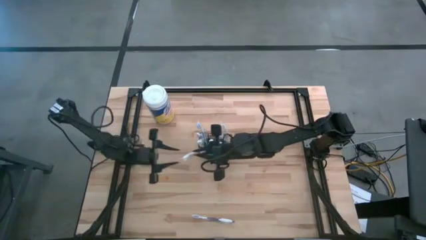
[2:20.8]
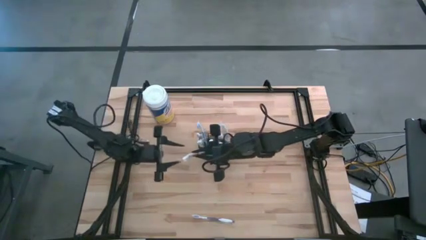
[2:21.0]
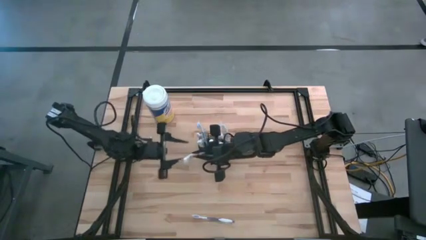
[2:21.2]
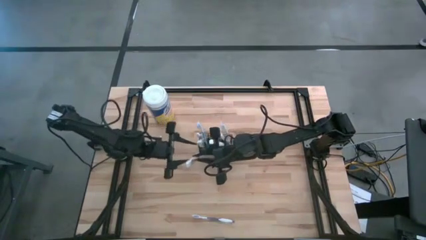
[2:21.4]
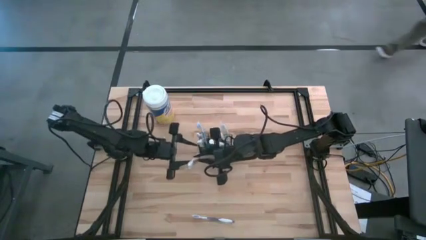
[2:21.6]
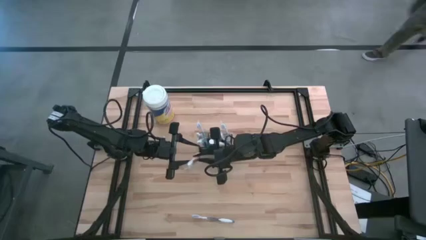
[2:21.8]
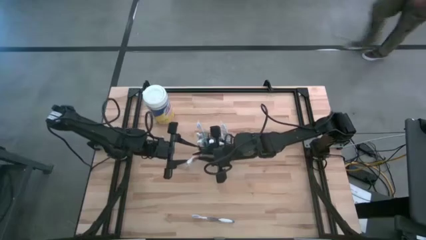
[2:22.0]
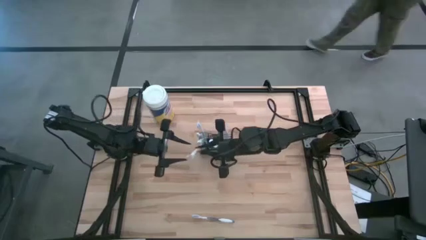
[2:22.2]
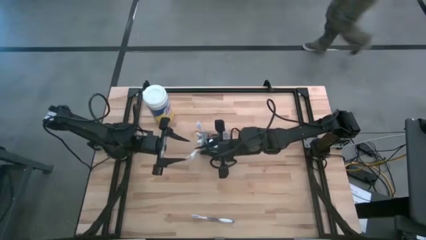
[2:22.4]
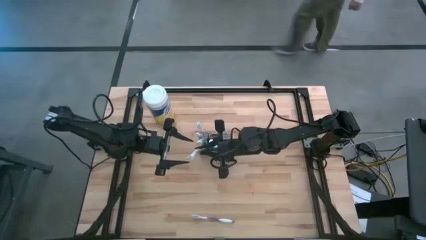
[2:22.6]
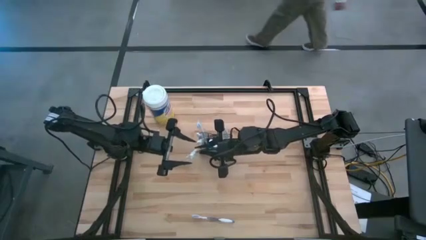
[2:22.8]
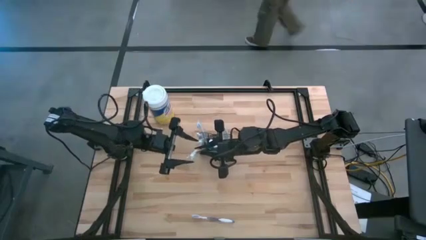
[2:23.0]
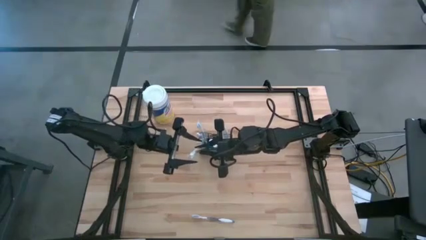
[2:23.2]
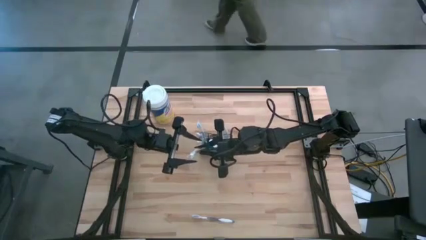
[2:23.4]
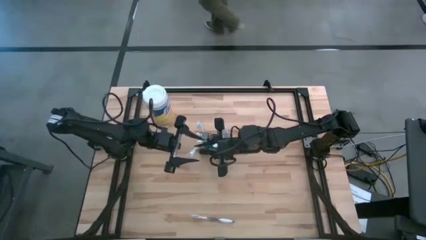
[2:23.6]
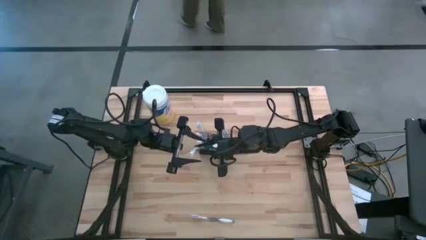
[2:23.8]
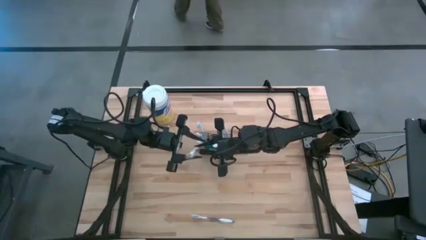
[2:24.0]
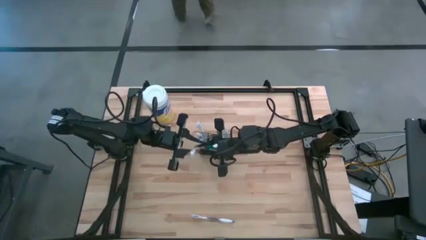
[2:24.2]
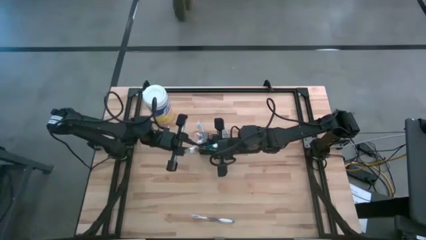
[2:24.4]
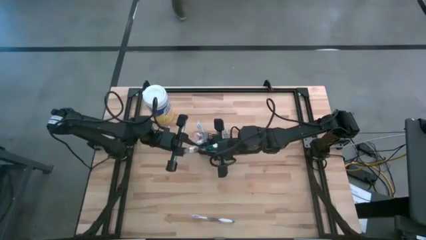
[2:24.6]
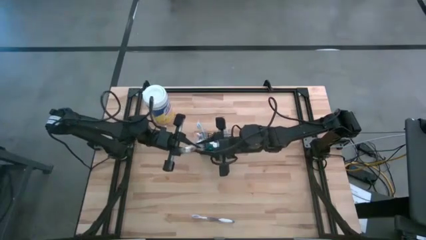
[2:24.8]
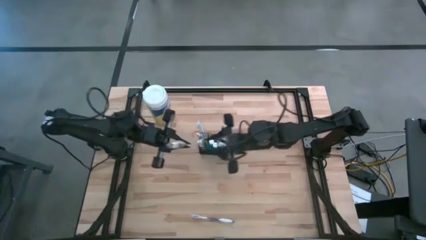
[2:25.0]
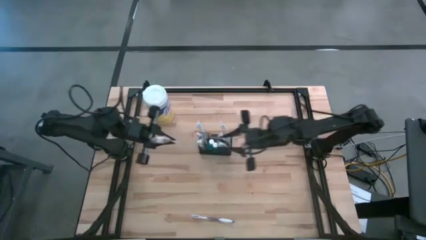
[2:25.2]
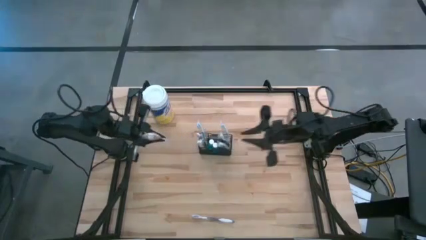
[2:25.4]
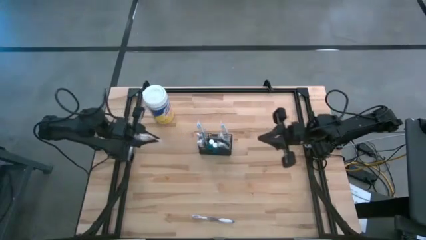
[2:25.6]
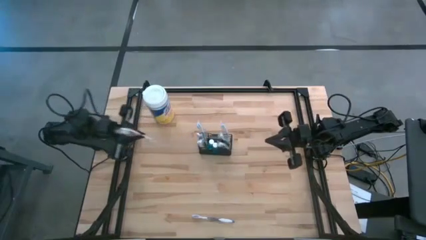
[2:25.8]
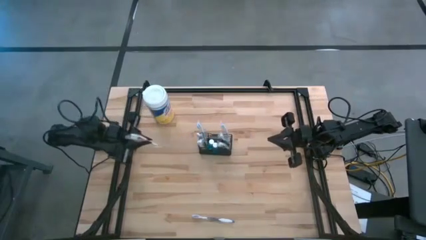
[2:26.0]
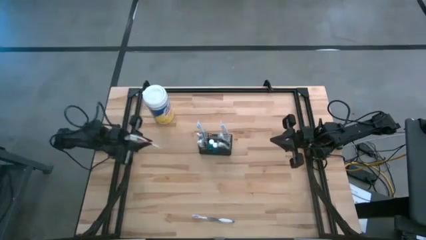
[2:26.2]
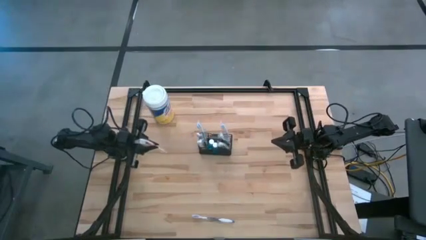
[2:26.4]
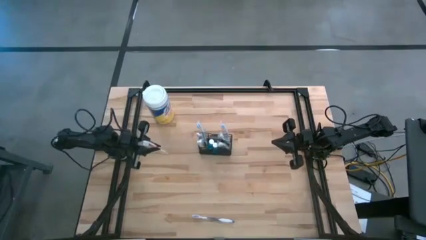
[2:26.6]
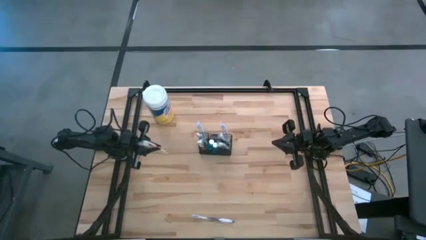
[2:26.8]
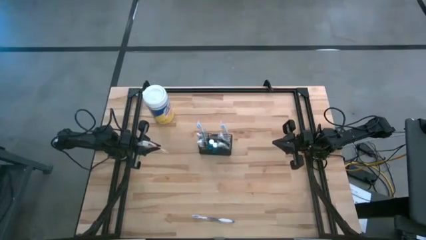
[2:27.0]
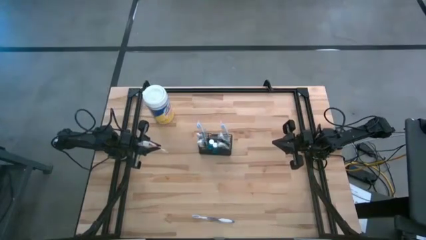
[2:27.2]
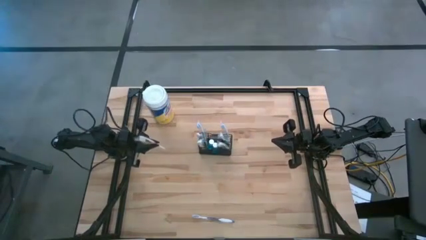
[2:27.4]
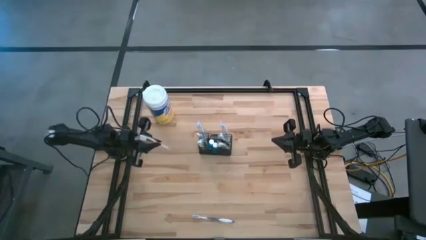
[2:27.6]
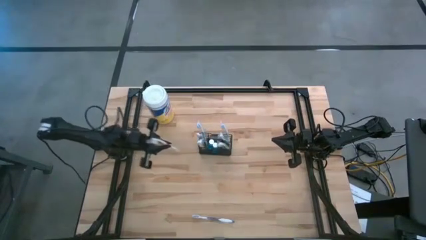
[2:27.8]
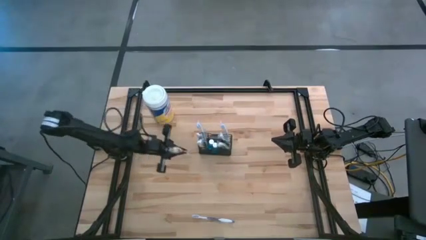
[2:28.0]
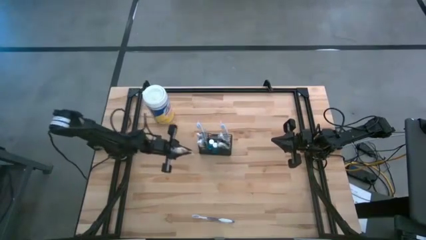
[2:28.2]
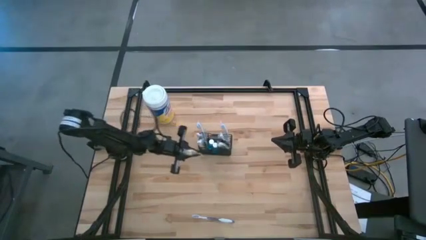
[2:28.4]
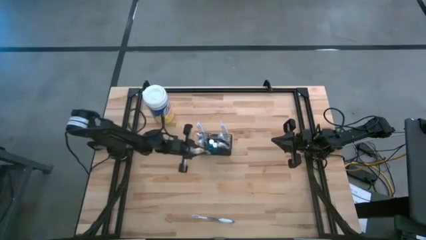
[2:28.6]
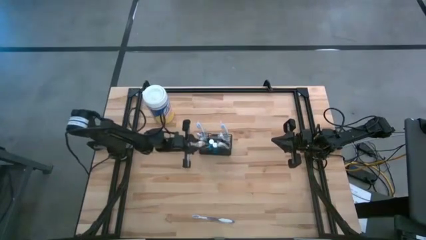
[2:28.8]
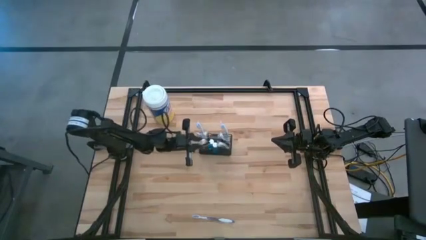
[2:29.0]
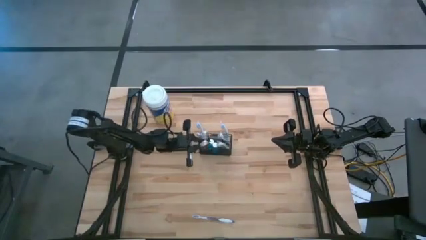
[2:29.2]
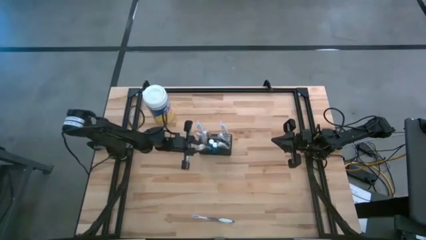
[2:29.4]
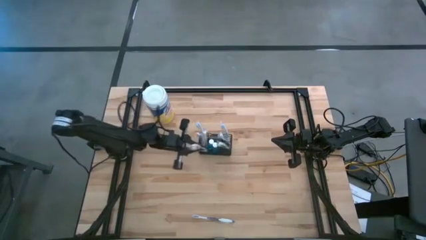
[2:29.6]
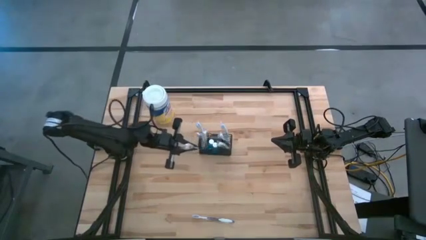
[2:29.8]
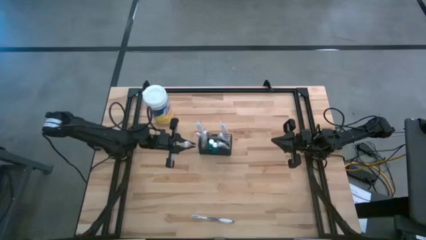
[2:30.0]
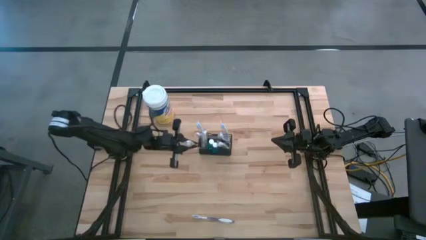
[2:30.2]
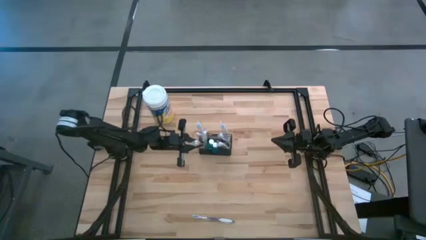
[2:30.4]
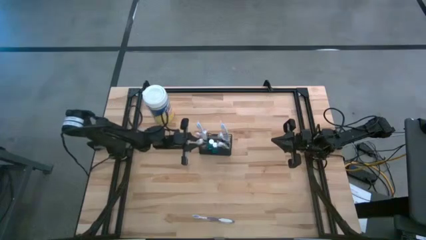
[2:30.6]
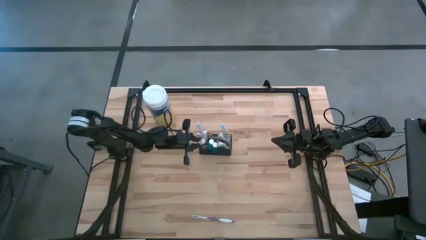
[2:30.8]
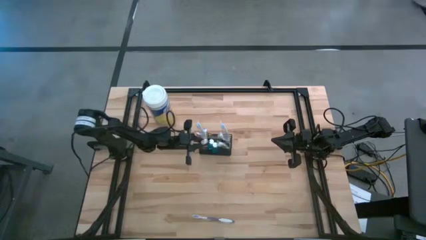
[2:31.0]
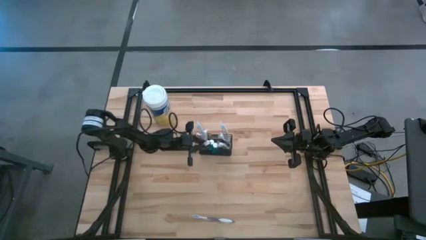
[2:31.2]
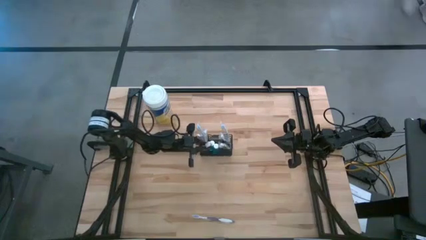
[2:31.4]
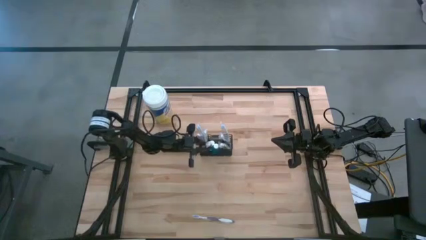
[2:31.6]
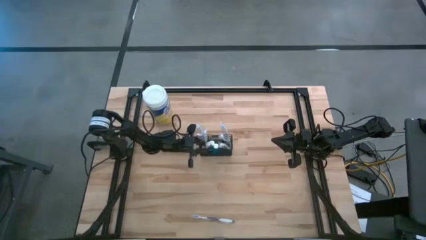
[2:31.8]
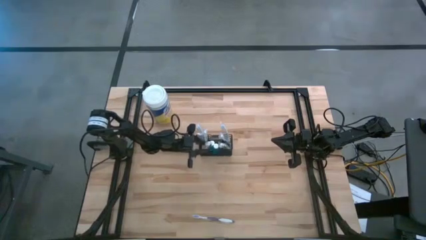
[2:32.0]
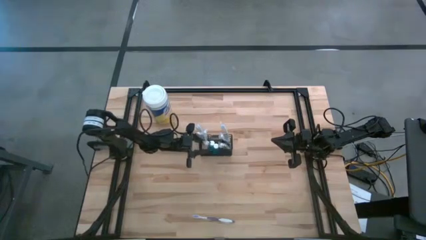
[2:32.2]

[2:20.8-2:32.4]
Task: Pick & Place toothbrushing station
Put the orange toothbrush into the mesh organizer

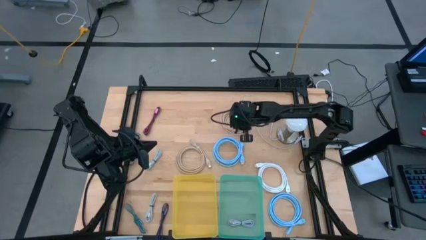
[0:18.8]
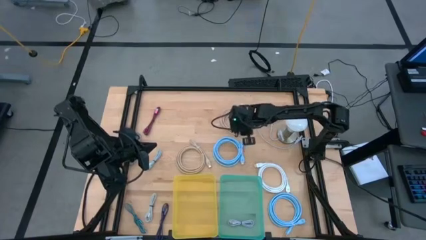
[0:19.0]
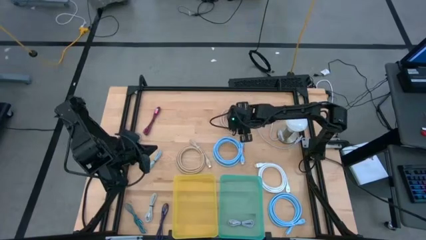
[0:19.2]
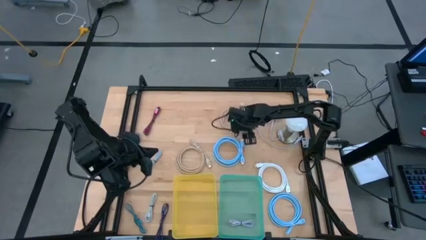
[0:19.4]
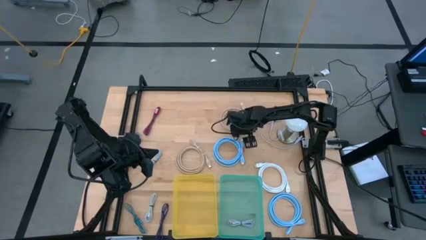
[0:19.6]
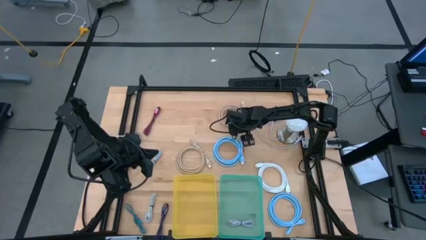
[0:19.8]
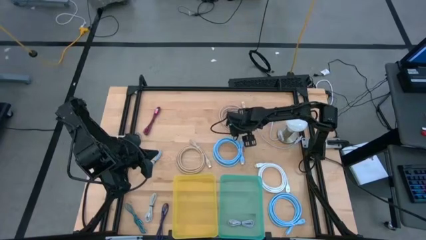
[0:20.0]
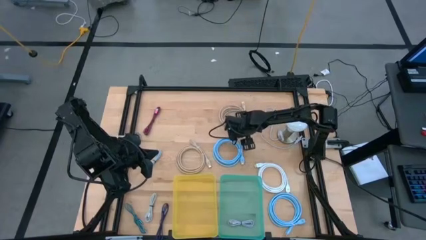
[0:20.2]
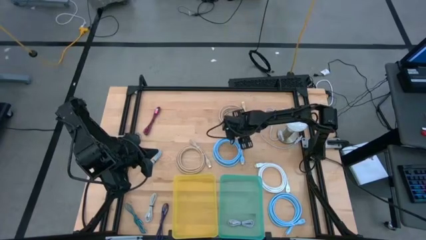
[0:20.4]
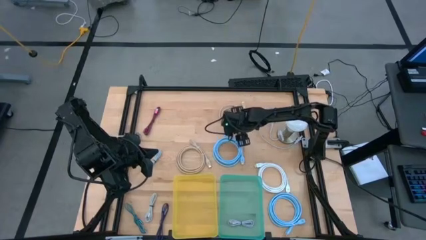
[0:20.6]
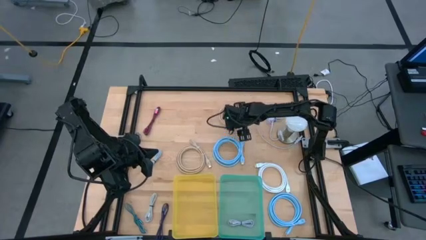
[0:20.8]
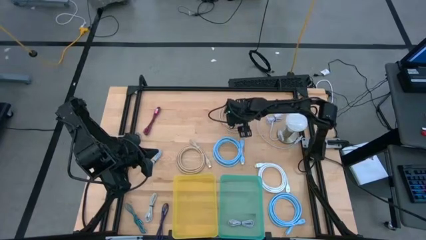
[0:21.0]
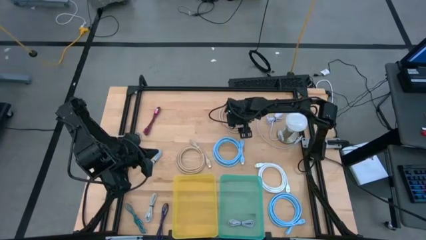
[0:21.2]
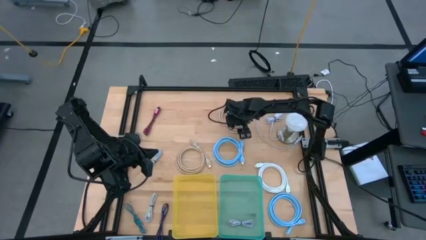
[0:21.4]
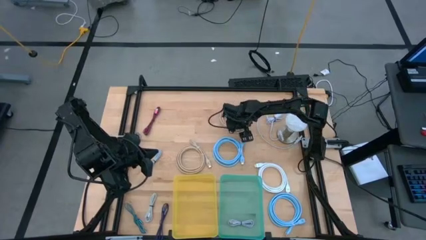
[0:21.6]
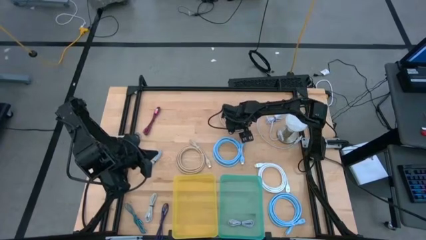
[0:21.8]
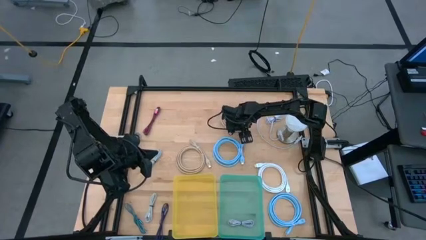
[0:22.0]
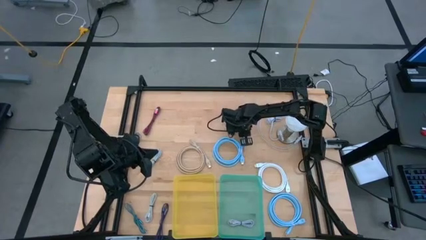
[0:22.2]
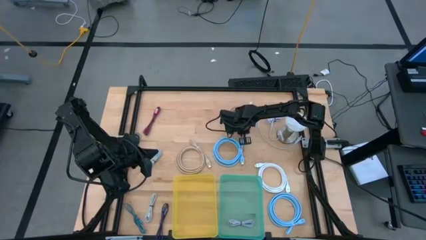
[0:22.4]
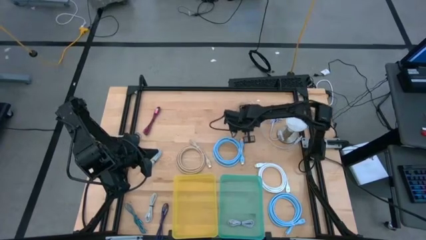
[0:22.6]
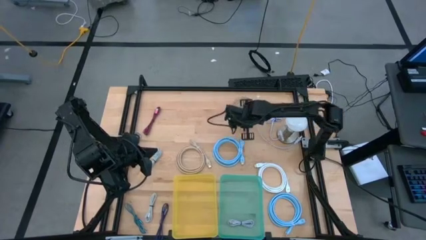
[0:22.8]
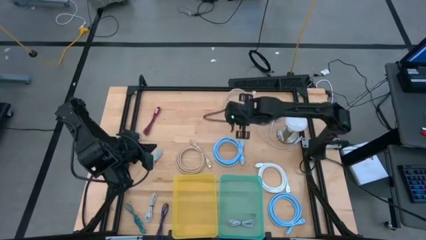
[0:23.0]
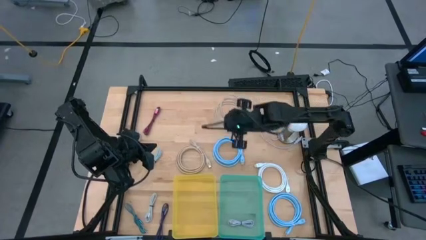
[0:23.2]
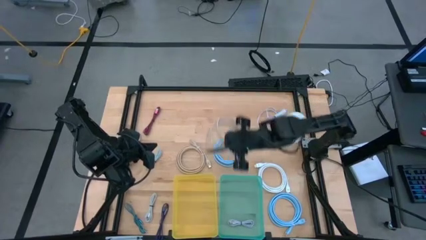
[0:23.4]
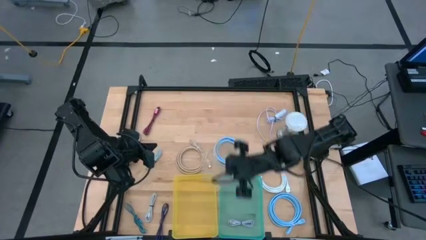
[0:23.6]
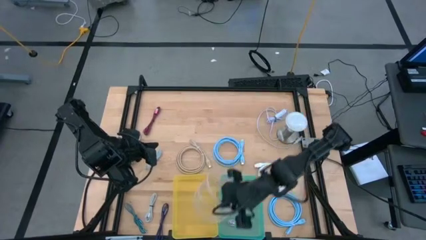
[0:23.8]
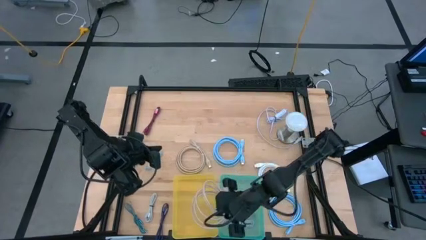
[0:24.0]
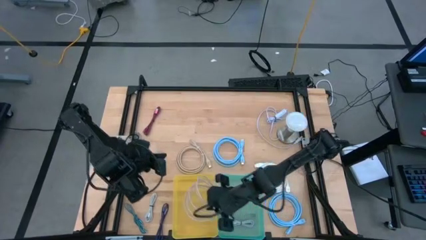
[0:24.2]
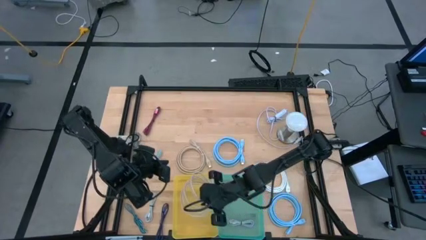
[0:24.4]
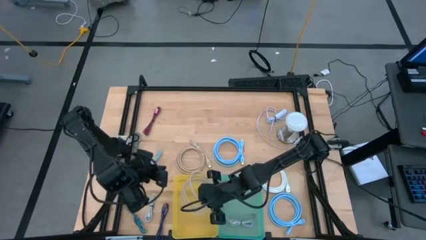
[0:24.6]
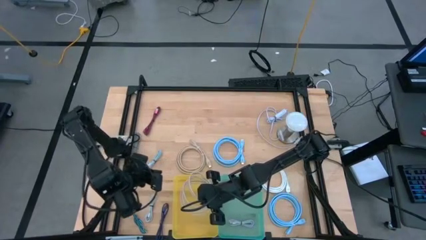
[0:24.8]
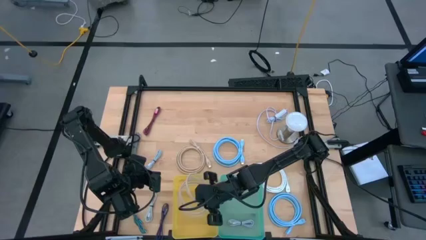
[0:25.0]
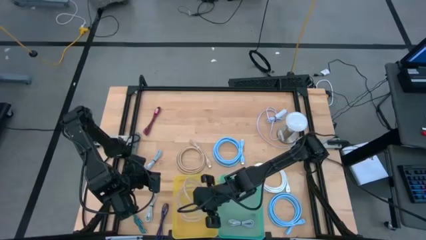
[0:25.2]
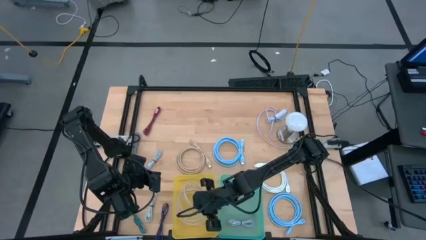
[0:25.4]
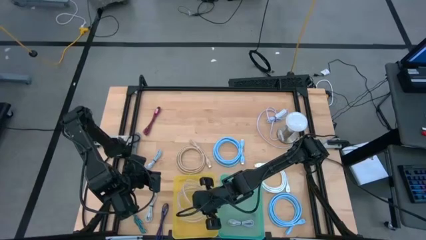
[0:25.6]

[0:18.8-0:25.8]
Task: Pick & Place USB Port
Put the large top brown charger cable into the yellow bin
